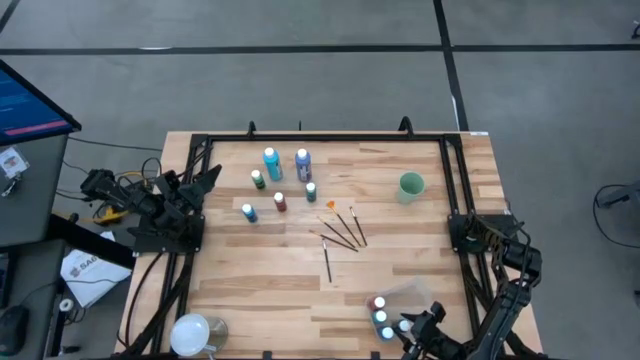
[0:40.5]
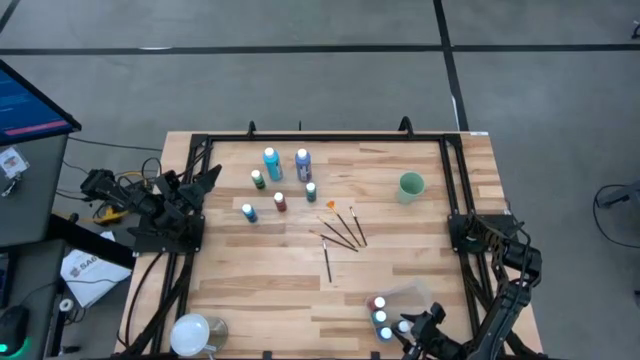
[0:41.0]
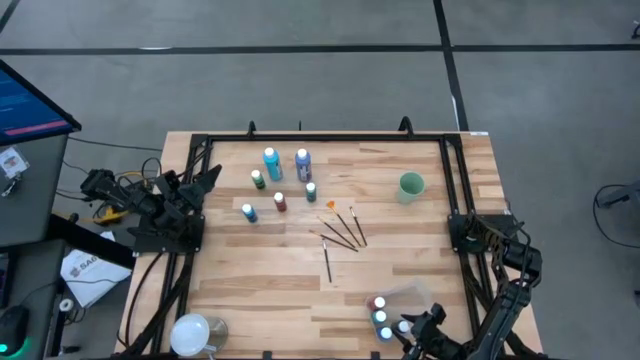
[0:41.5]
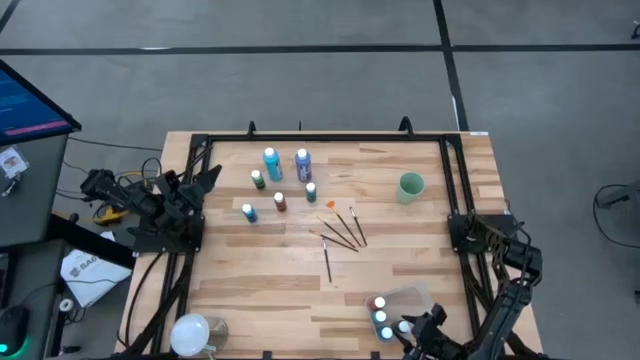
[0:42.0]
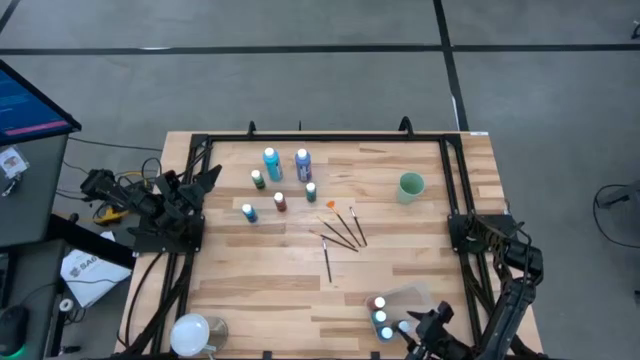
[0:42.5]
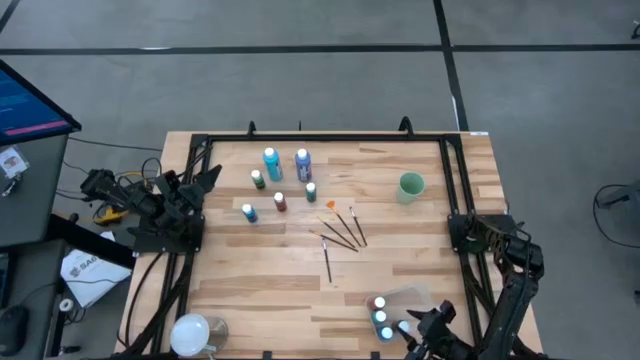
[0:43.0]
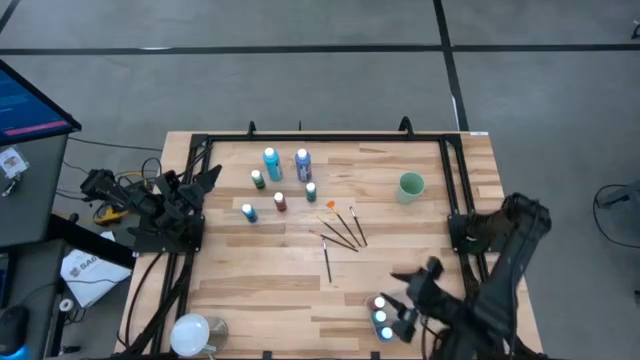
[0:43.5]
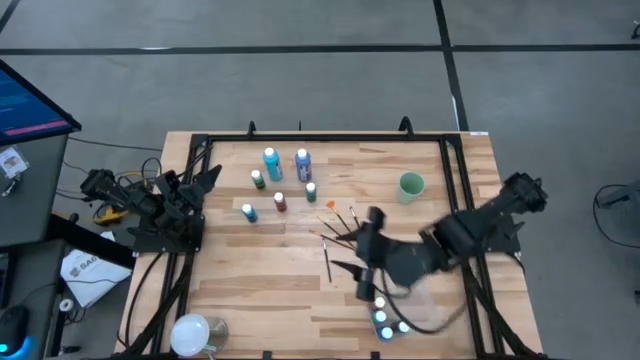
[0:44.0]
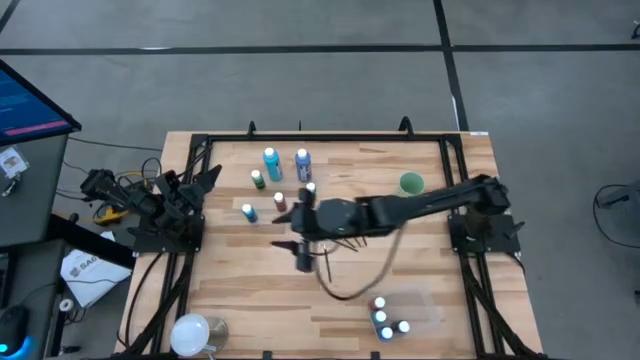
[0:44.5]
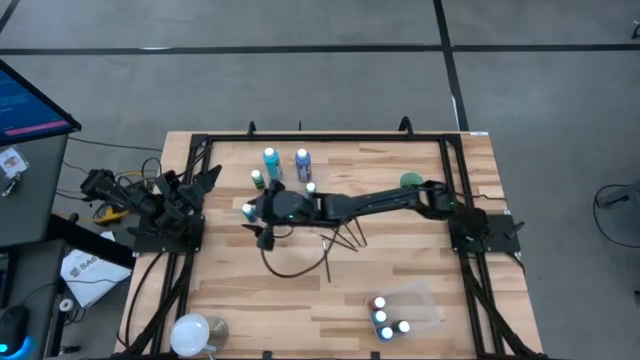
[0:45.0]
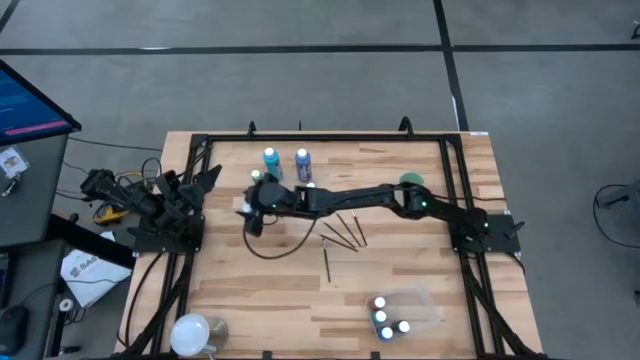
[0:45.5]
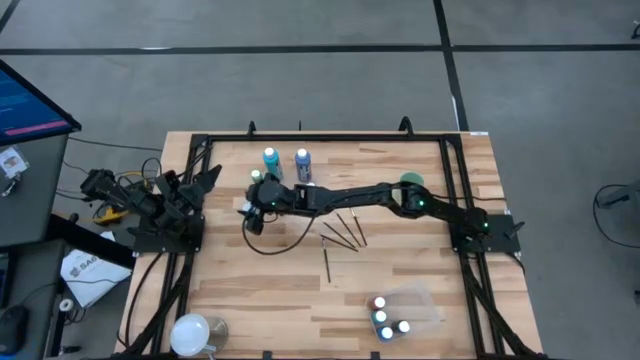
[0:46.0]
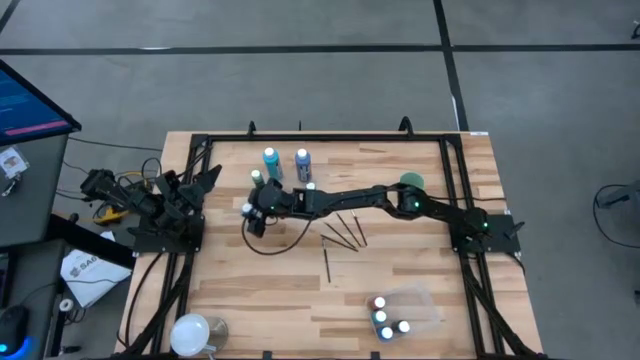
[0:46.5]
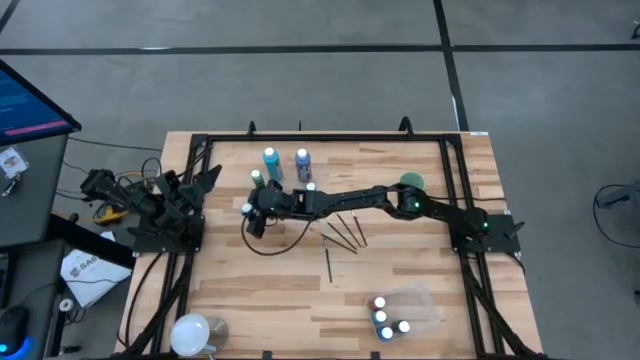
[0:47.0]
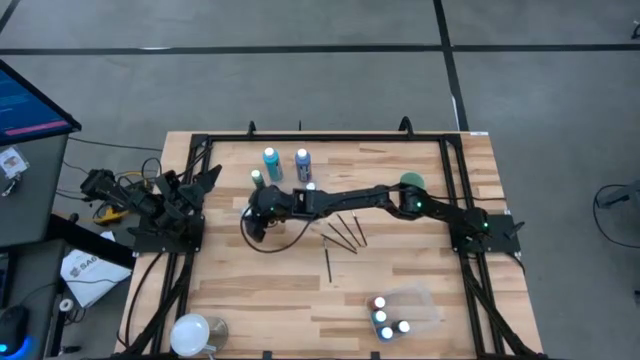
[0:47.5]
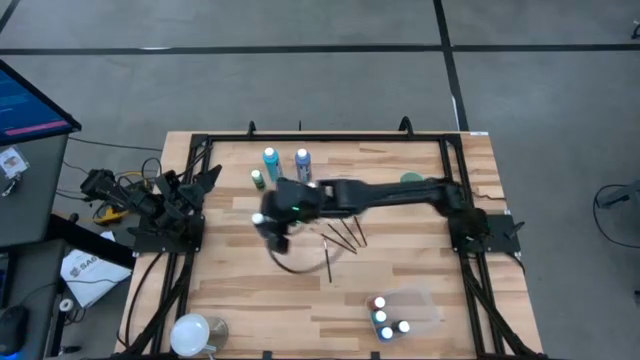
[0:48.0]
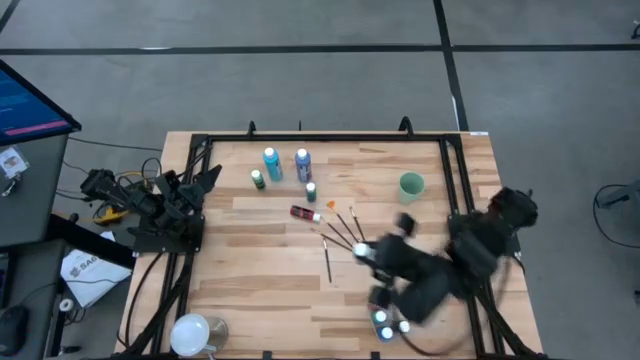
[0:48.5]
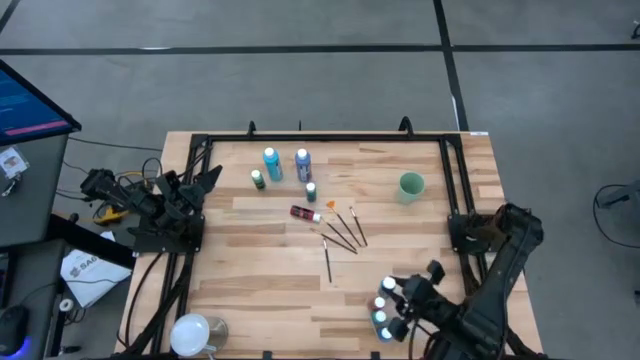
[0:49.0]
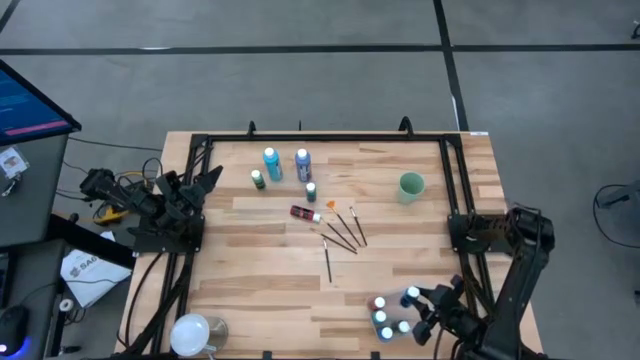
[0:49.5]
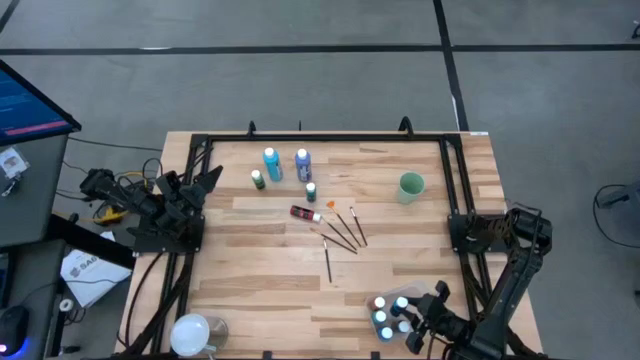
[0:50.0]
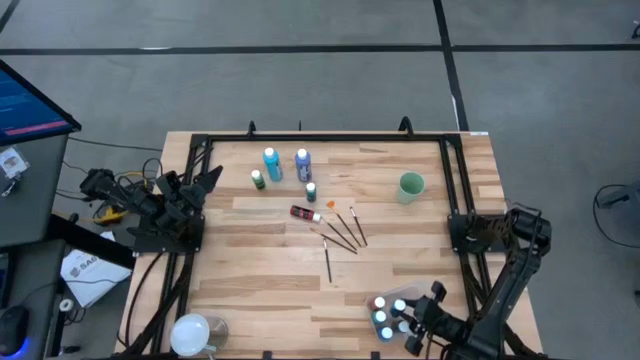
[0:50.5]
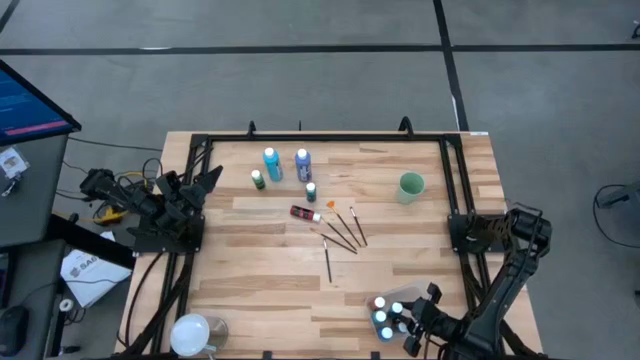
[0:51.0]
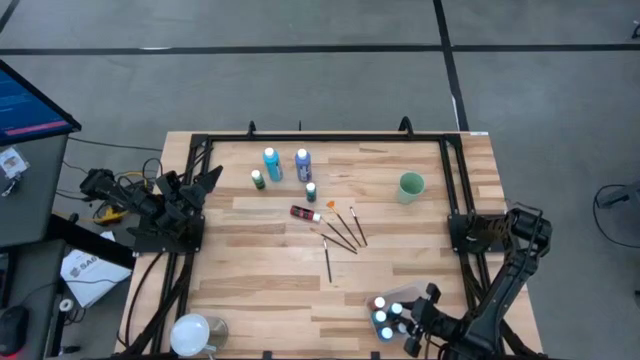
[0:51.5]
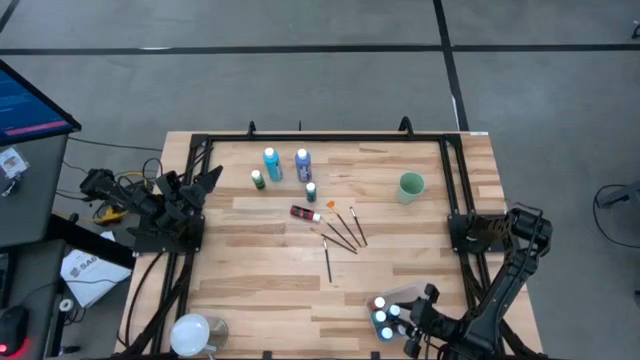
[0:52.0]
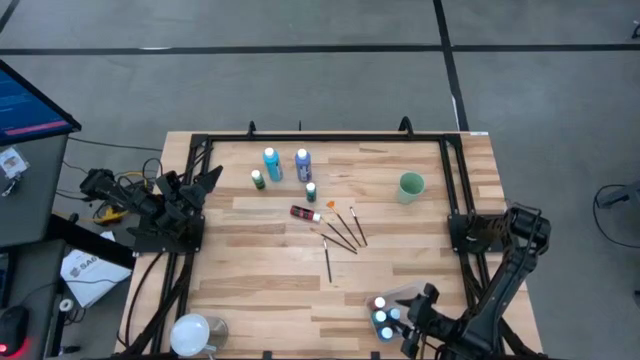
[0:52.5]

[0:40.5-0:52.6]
Task: Pick & Place Paint Supplies
Put the blue paint bottle into the transparent bin

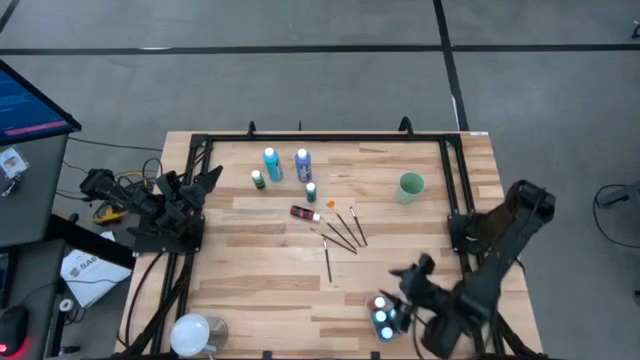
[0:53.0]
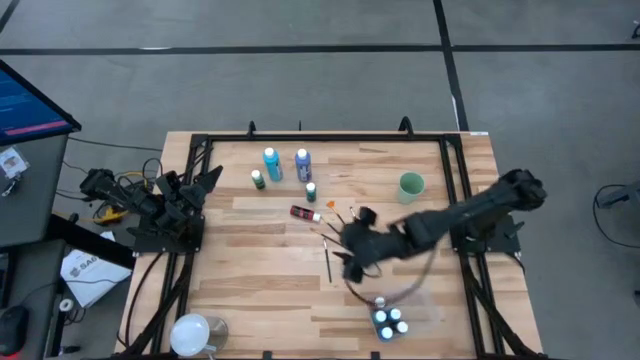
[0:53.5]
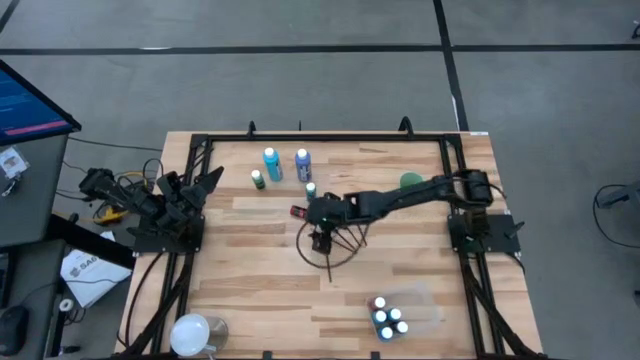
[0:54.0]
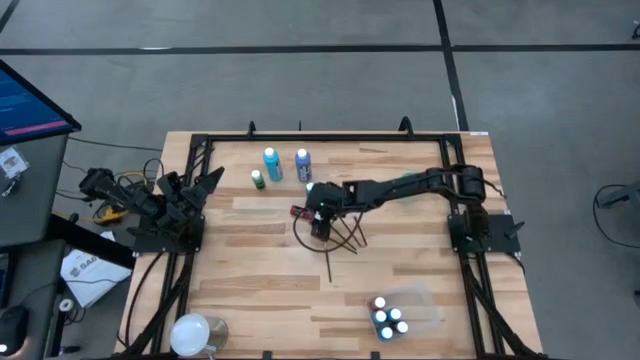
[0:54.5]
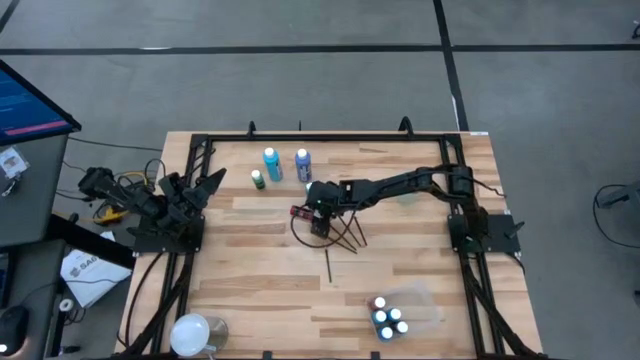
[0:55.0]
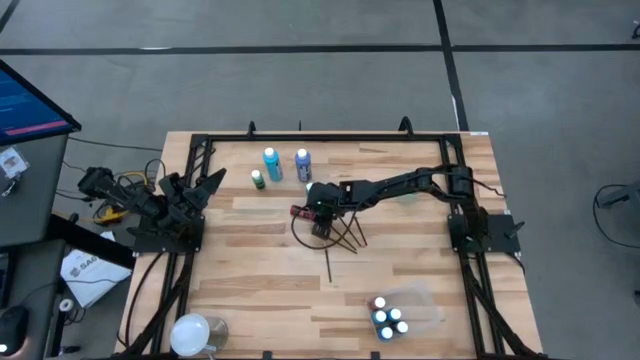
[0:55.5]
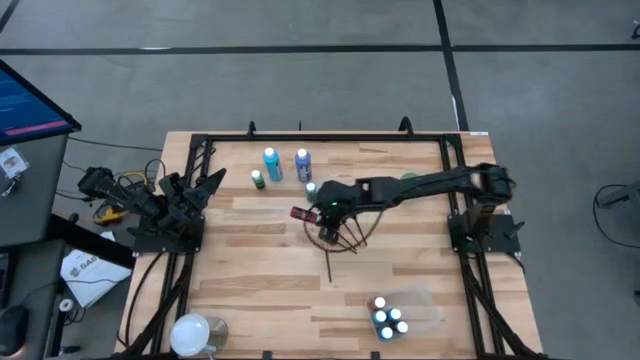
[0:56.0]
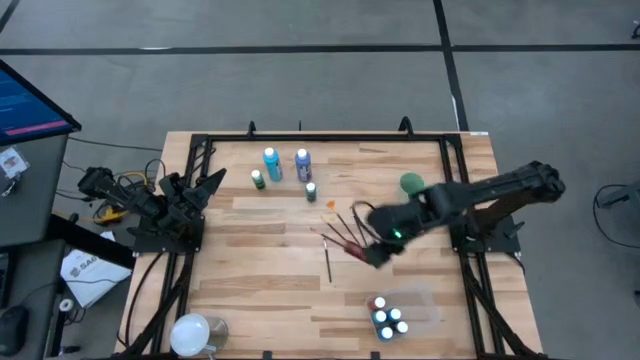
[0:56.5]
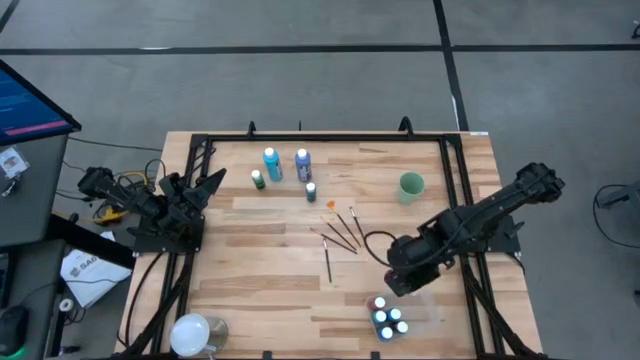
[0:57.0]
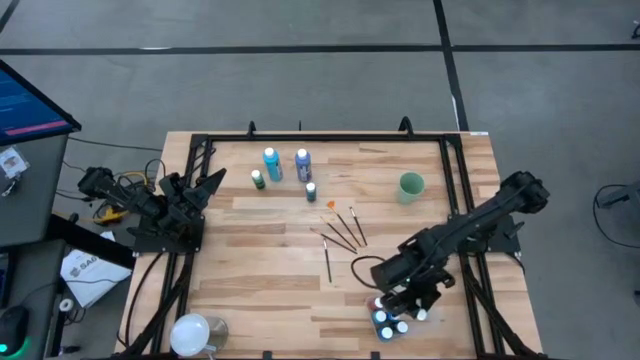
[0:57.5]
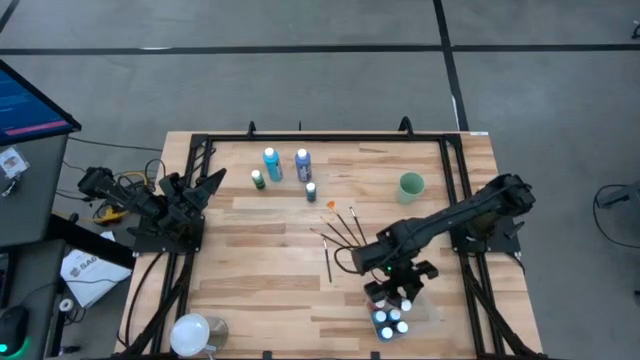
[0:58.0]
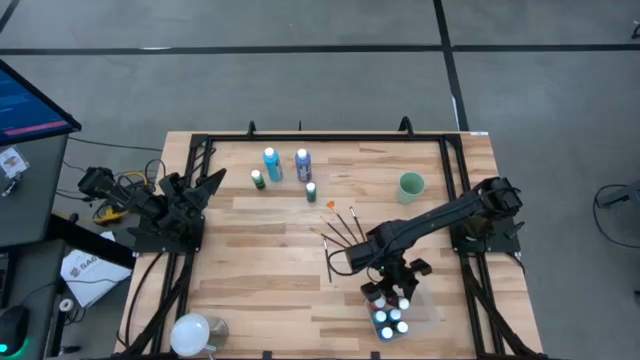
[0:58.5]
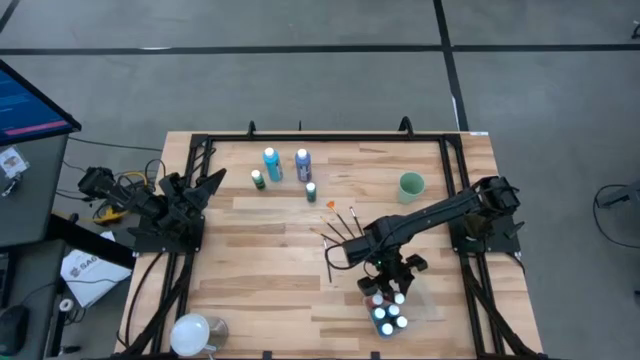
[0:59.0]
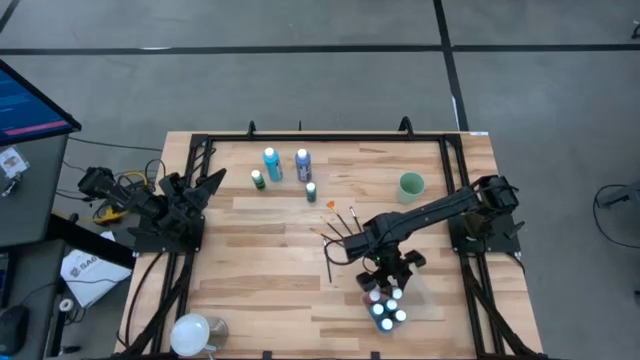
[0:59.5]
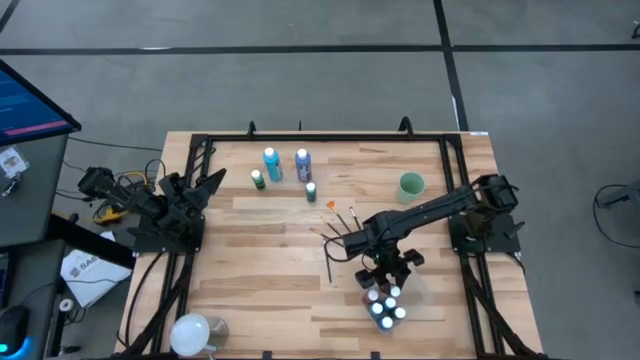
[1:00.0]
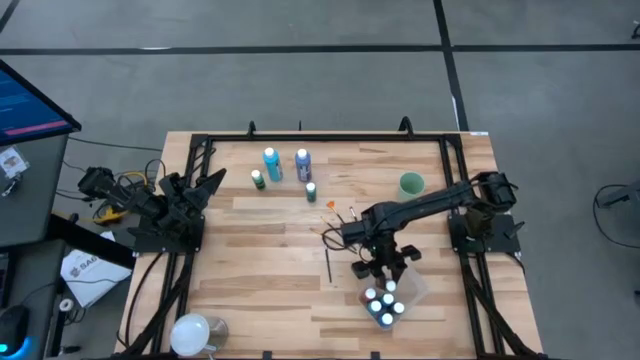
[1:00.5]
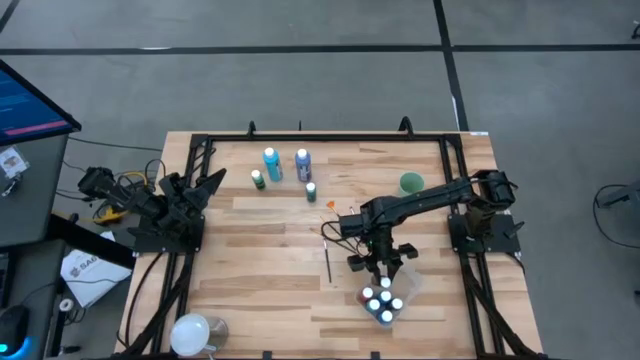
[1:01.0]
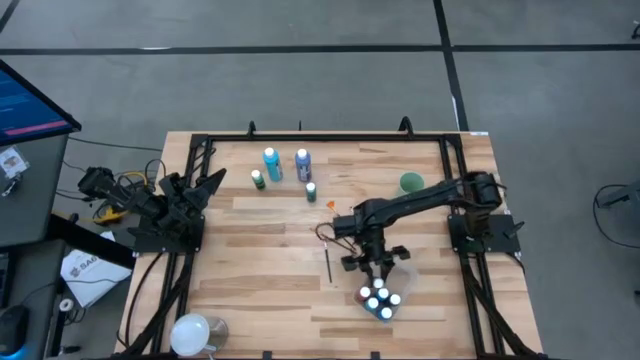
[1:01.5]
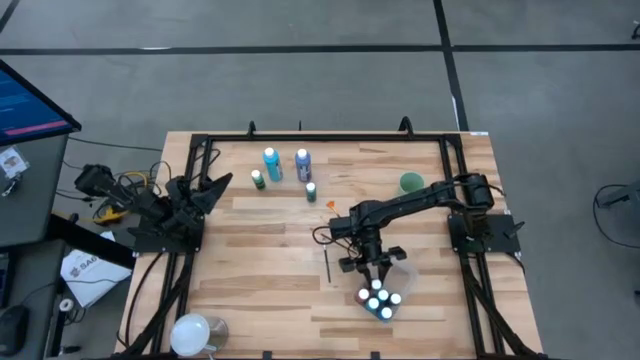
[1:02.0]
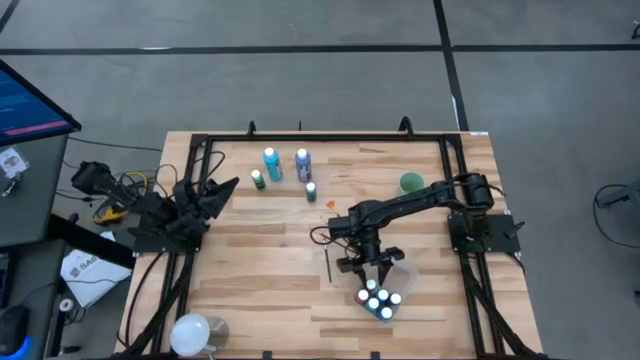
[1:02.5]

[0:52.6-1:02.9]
Put the red paint bottle into the transparent bin
